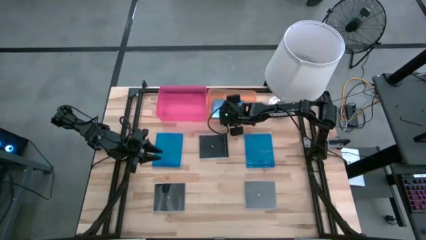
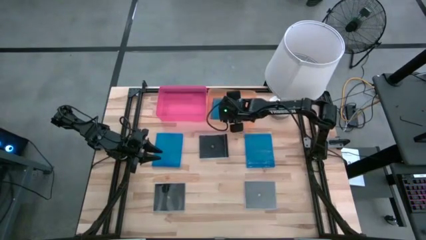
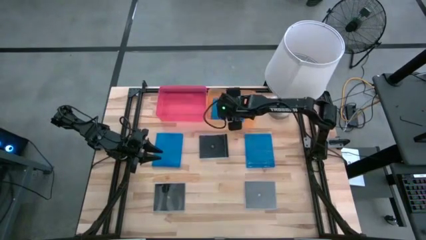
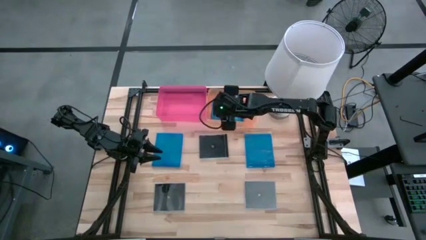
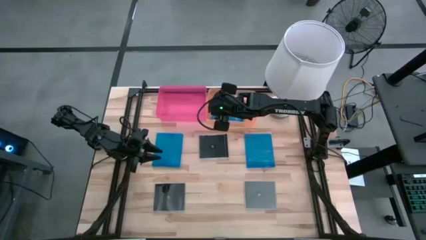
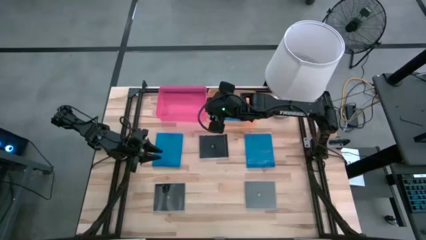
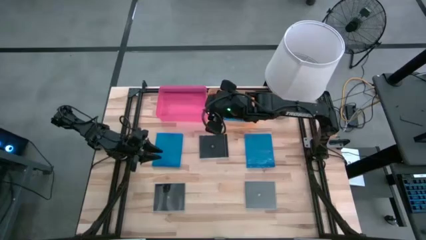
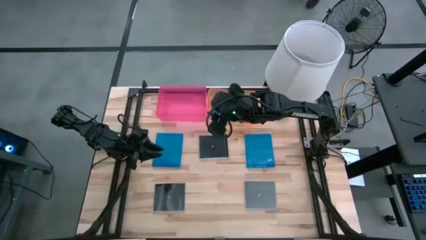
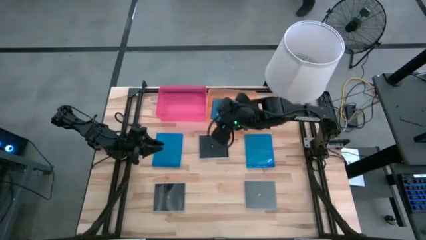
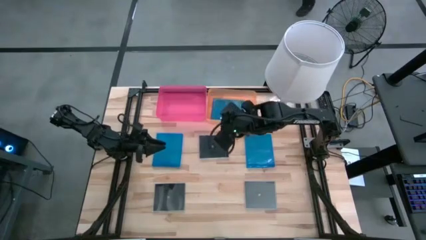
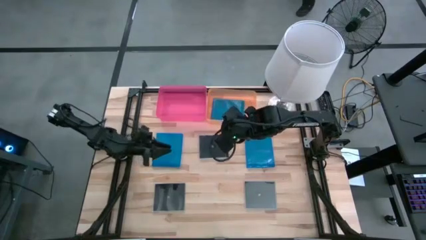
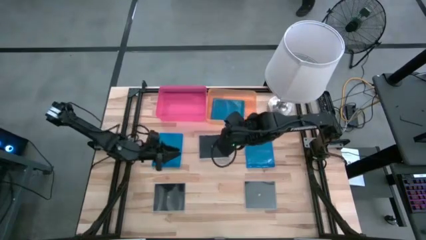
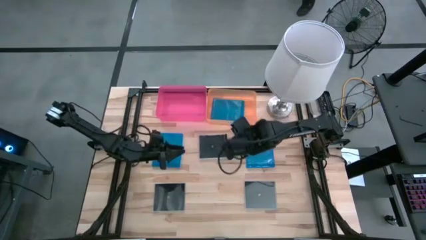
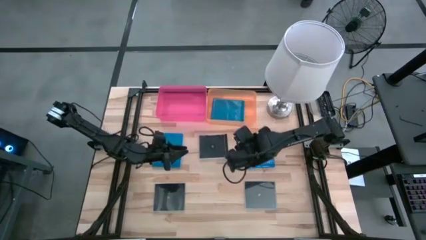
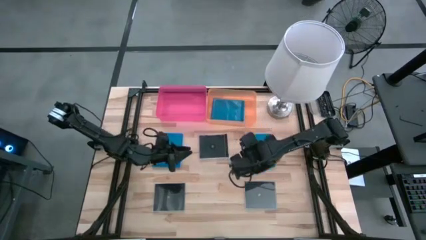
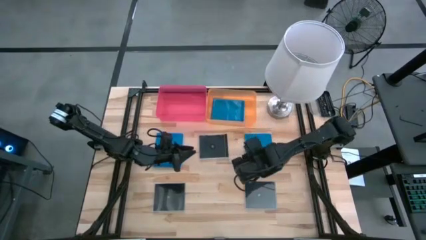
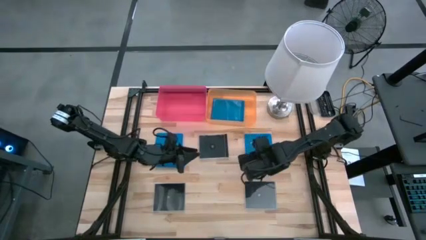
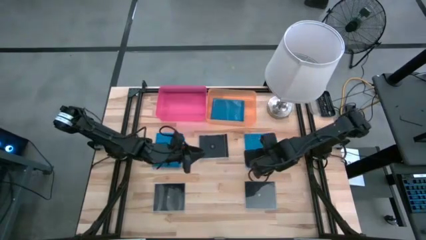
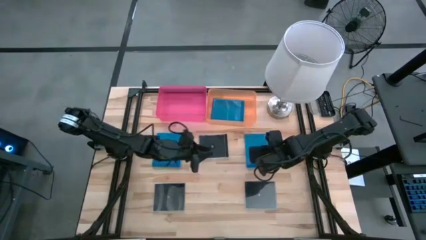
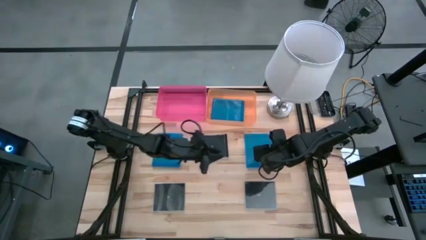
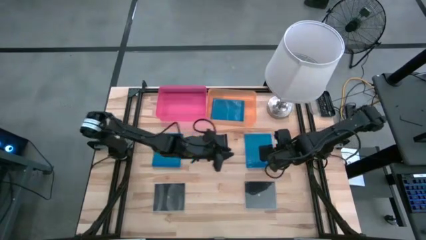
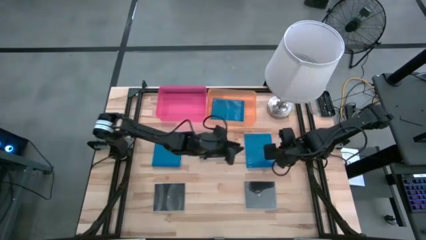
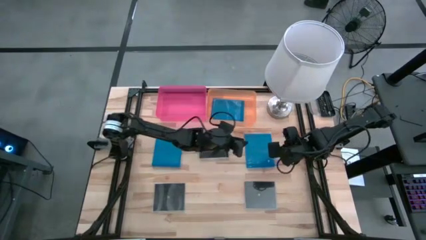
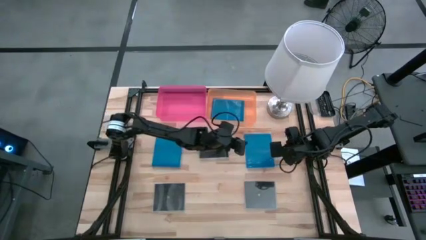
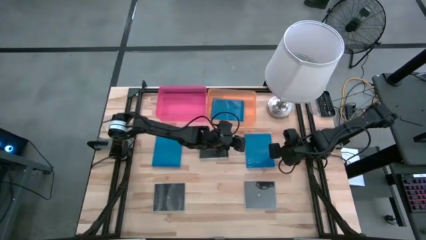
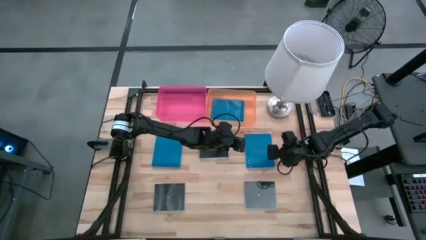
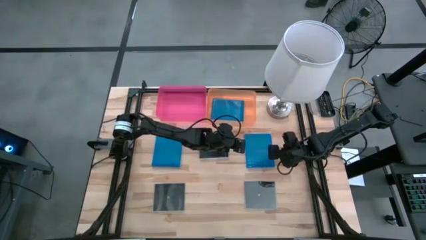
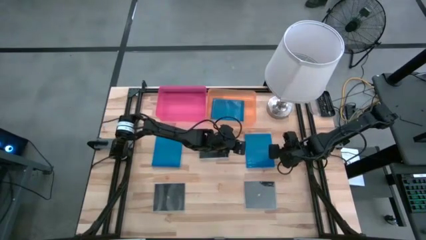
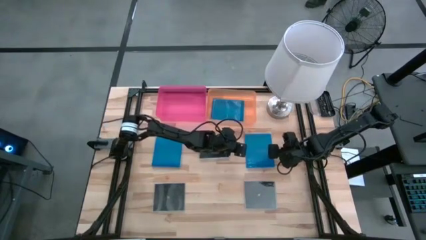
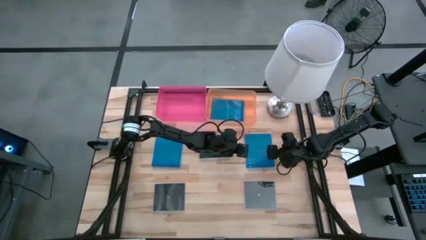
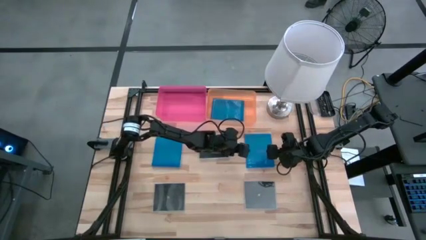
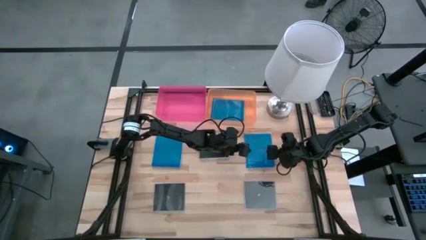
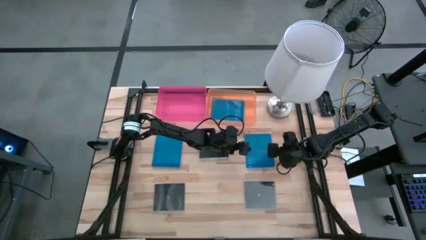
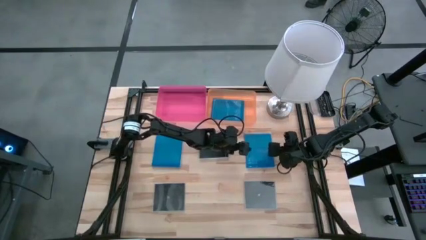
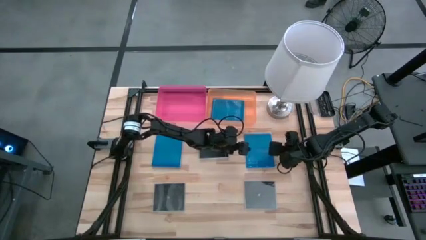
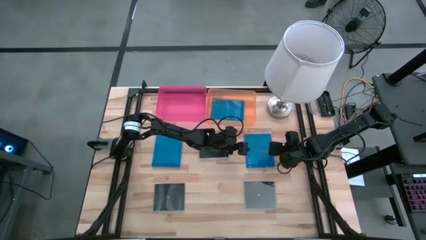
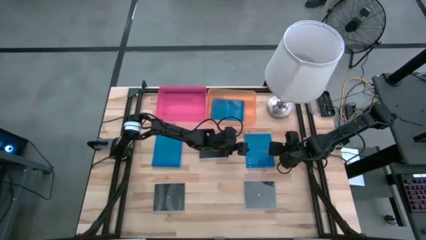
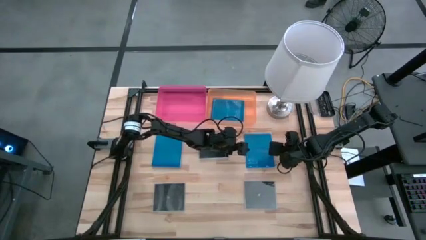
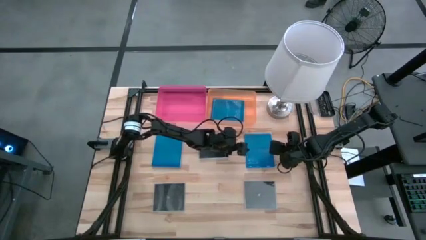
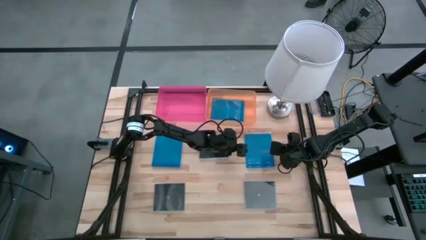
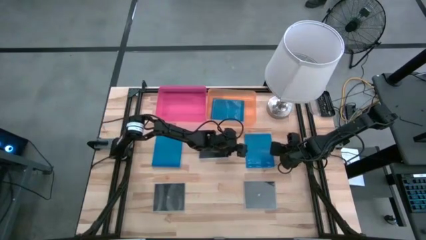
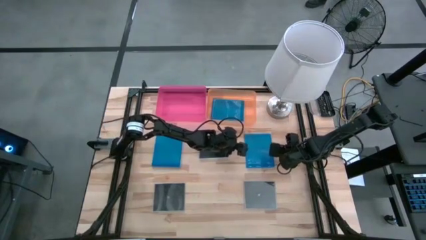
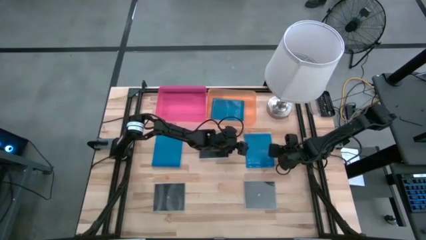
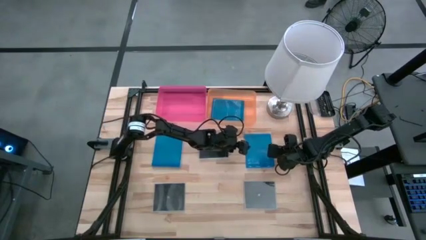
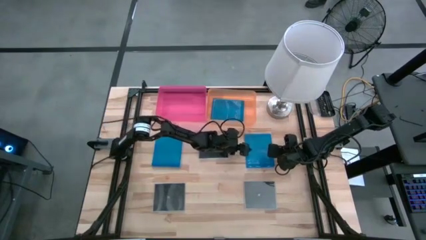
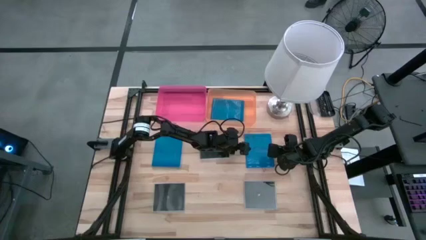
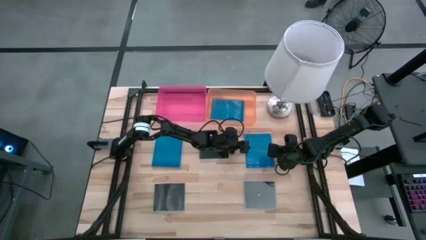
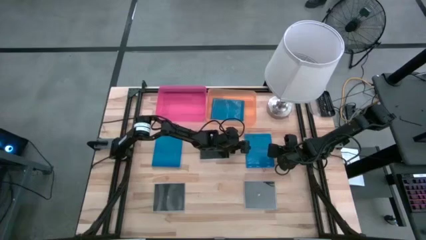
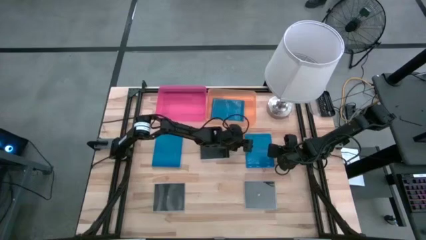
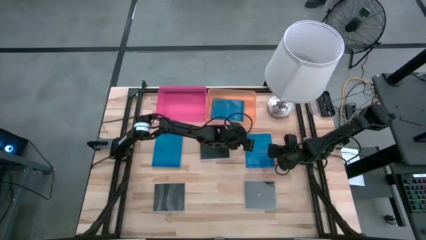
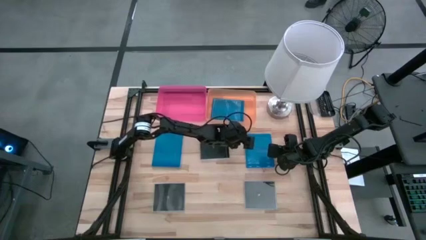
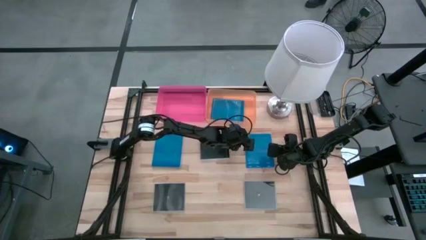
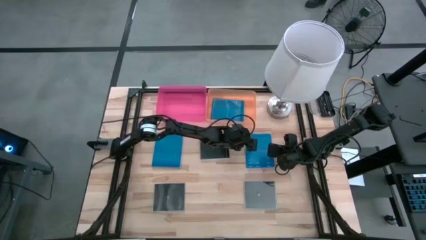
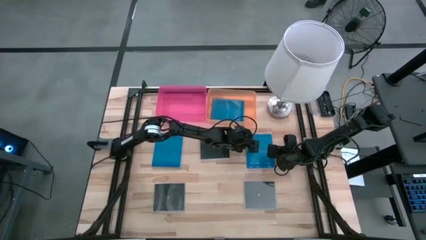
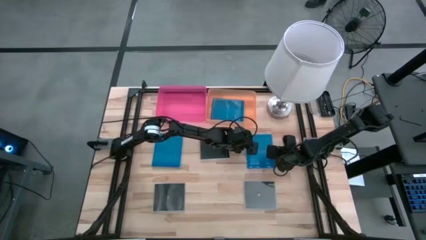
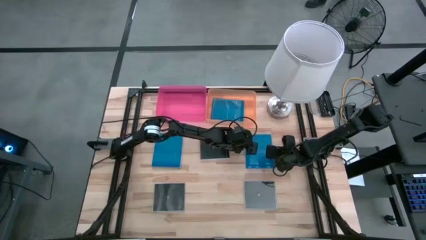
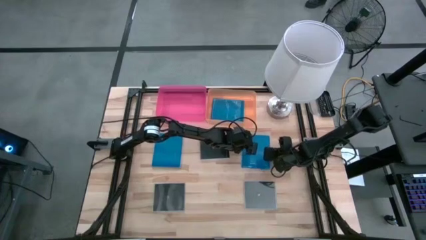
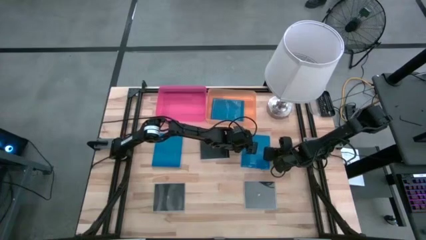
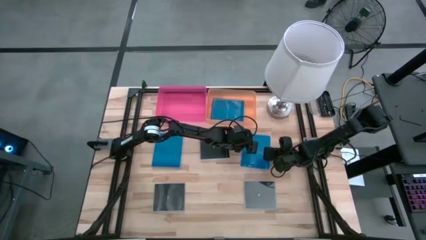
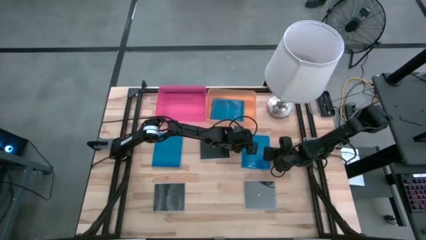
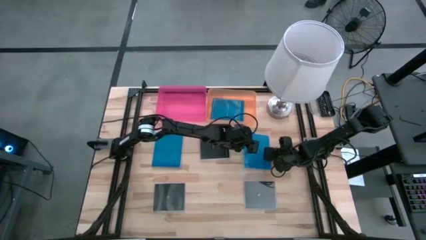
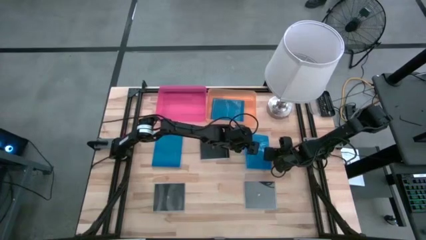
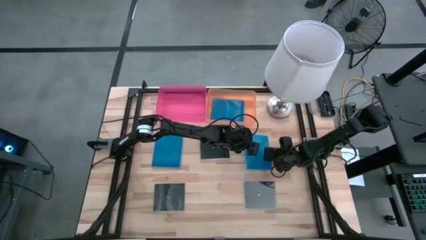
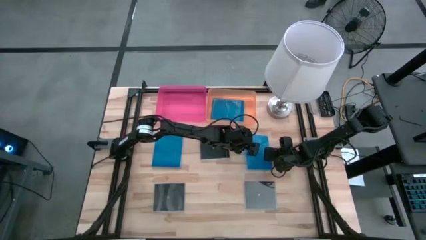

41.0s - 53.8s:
Task: Pick & place jewel cases by type
Put the right blue CD case into the orange bin
